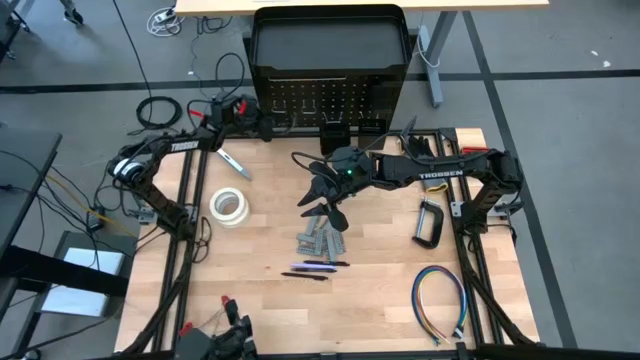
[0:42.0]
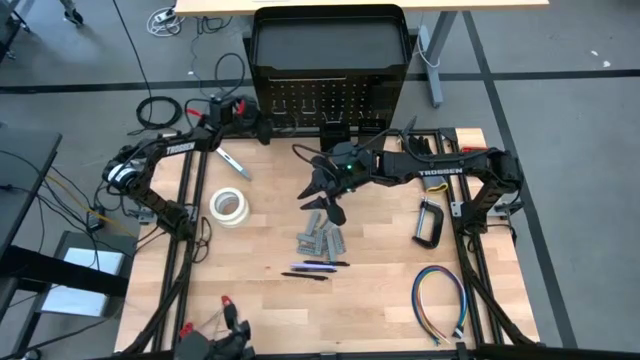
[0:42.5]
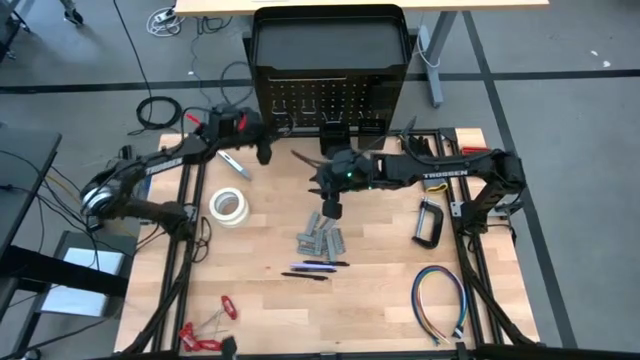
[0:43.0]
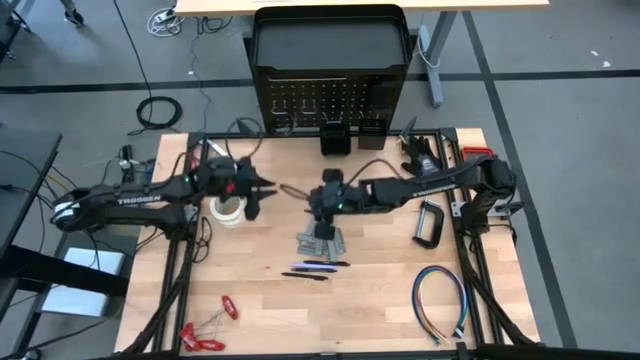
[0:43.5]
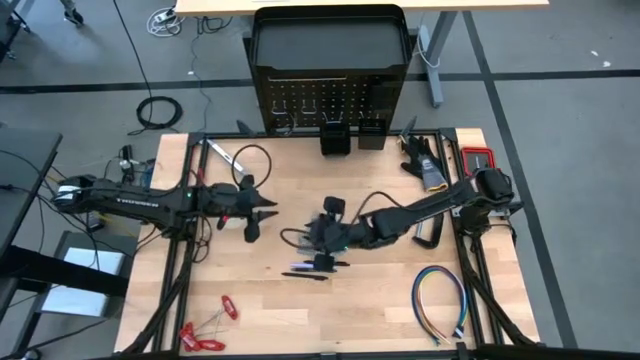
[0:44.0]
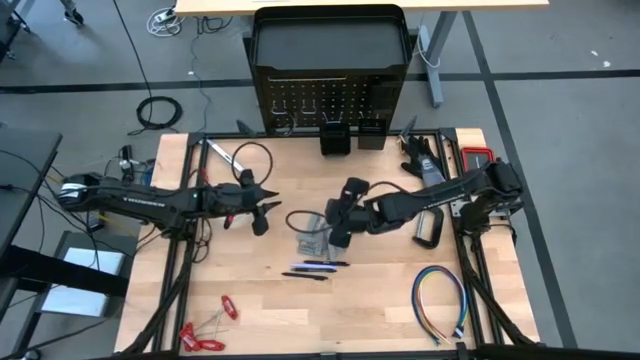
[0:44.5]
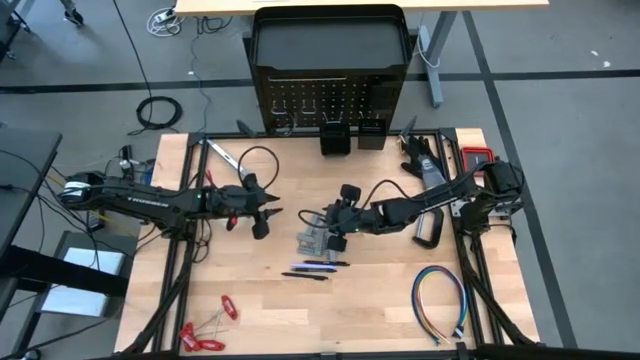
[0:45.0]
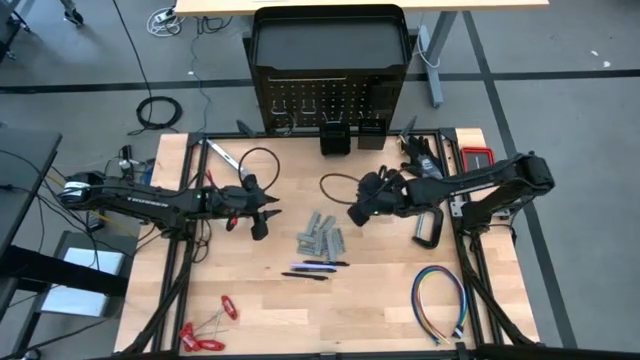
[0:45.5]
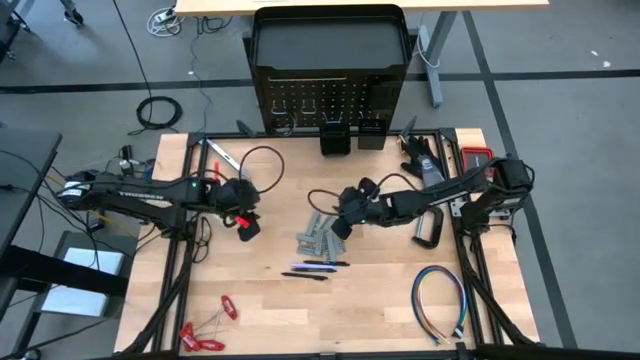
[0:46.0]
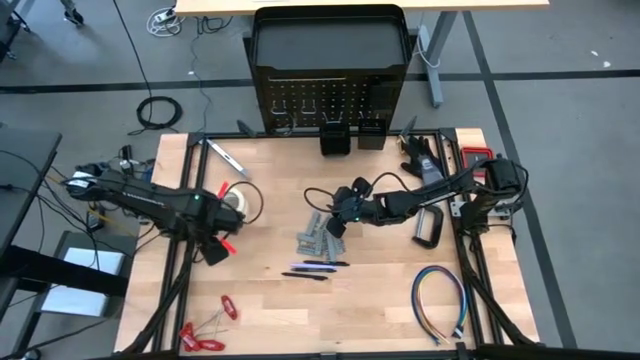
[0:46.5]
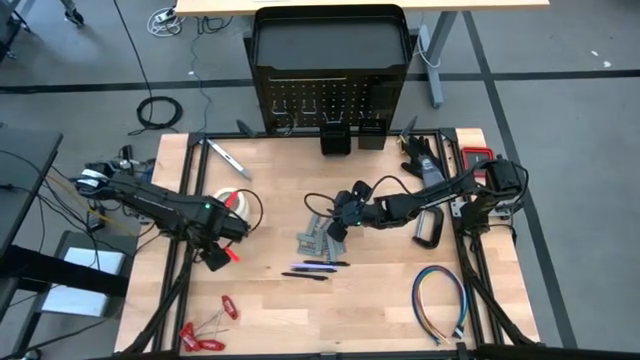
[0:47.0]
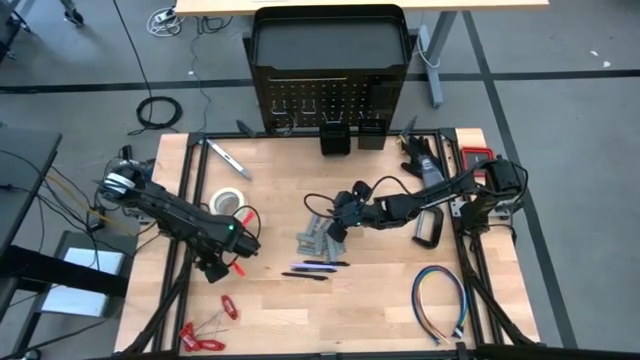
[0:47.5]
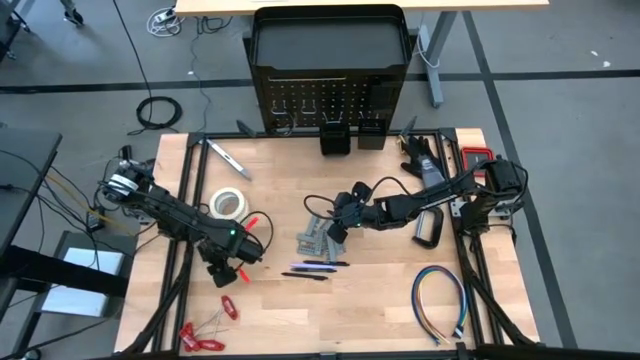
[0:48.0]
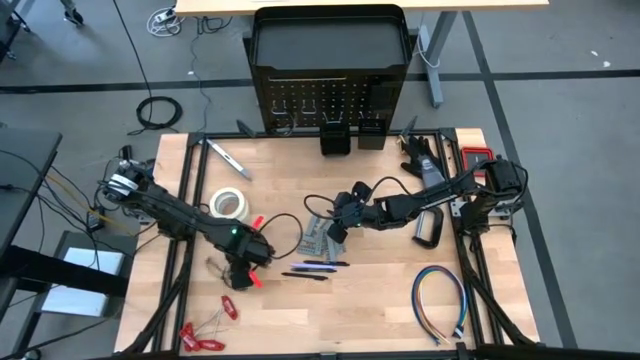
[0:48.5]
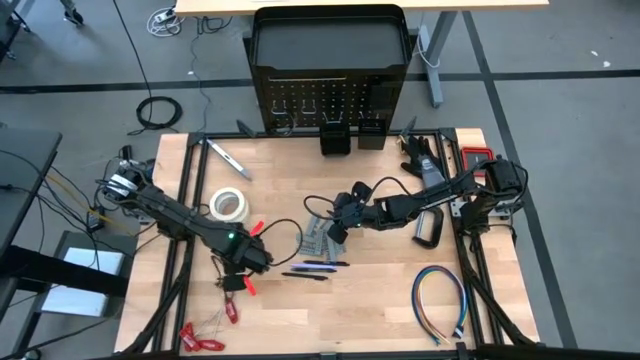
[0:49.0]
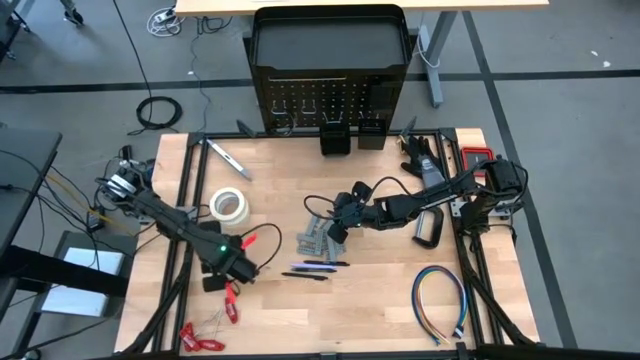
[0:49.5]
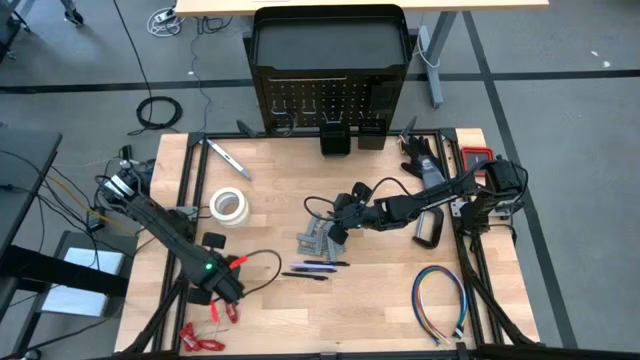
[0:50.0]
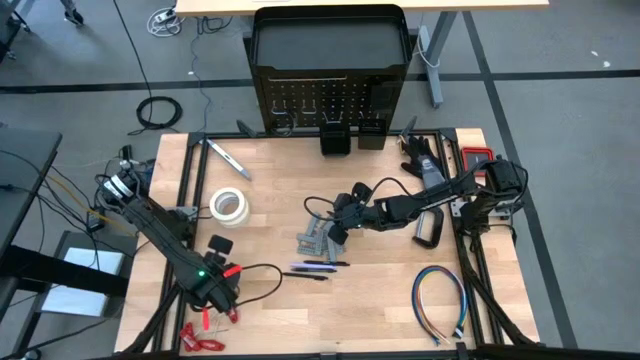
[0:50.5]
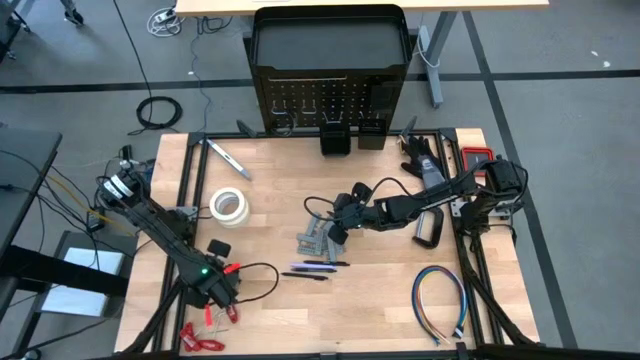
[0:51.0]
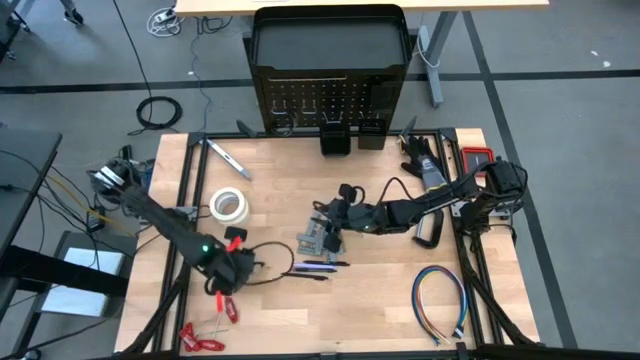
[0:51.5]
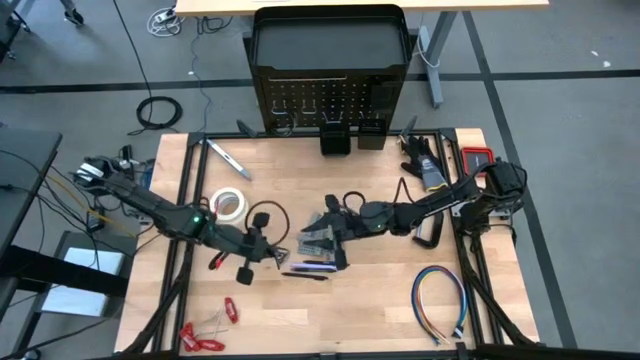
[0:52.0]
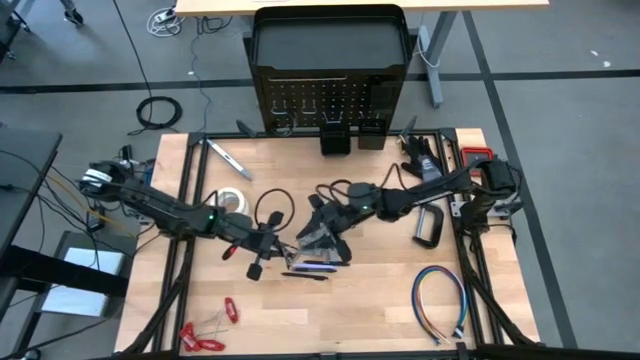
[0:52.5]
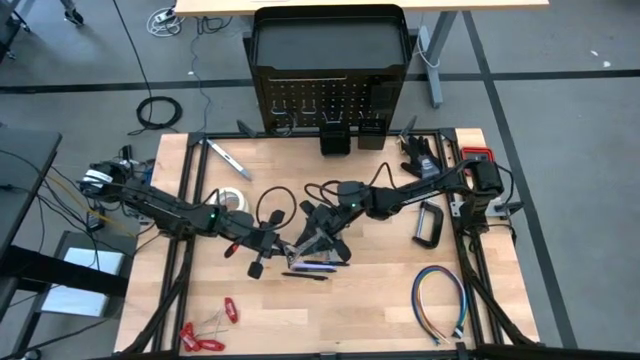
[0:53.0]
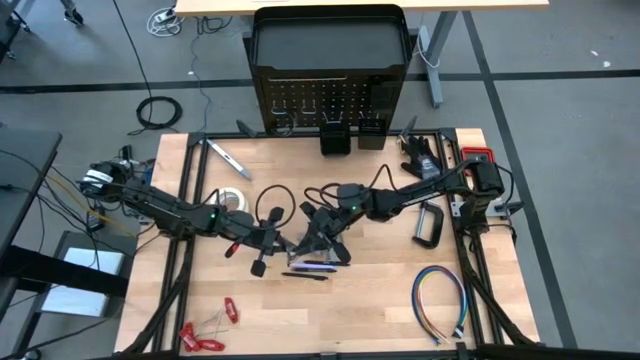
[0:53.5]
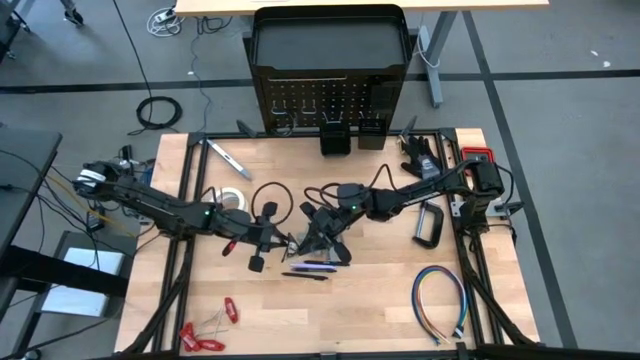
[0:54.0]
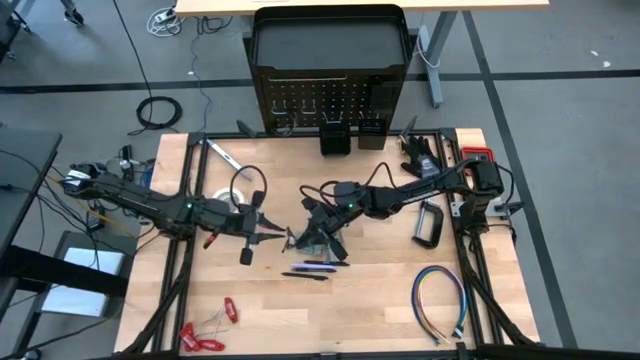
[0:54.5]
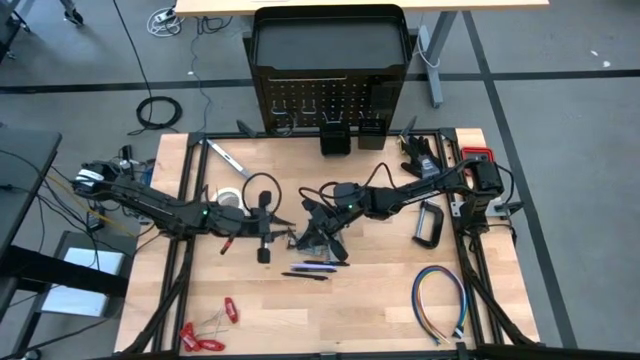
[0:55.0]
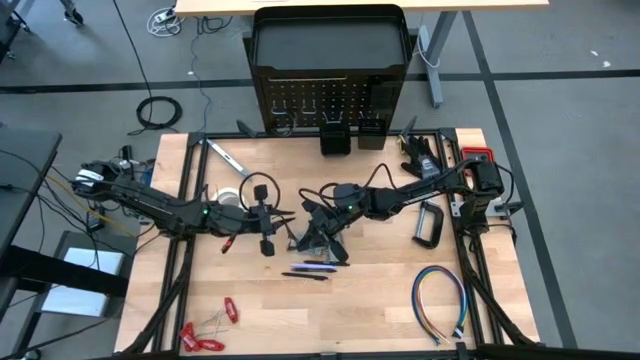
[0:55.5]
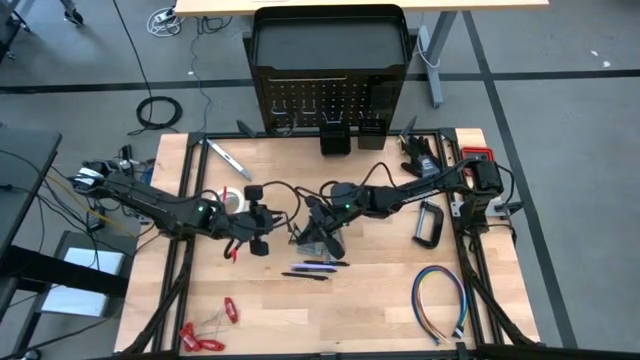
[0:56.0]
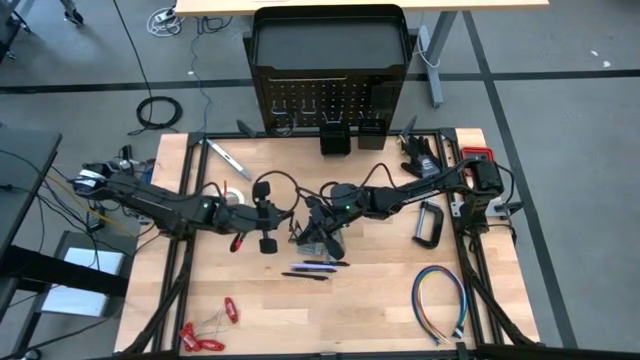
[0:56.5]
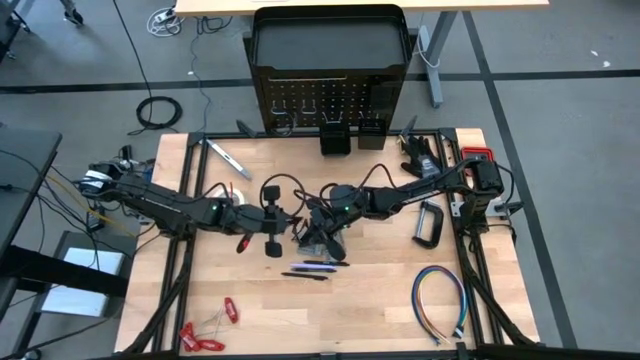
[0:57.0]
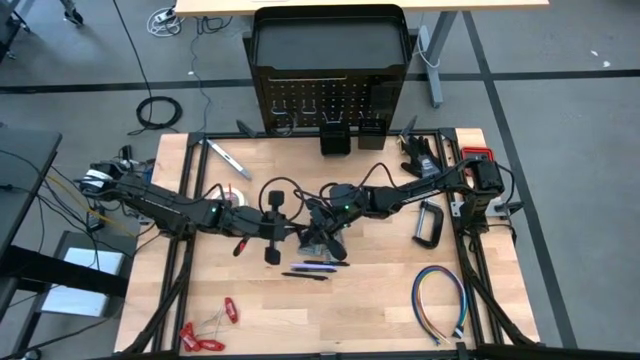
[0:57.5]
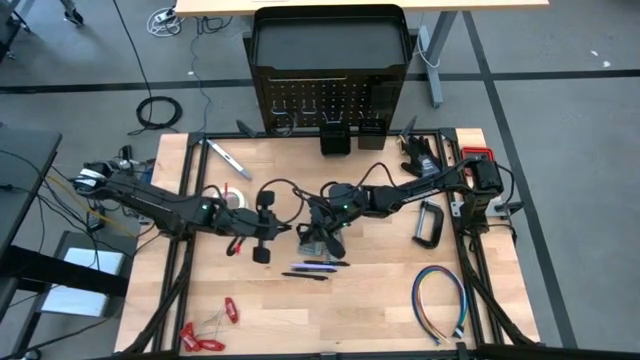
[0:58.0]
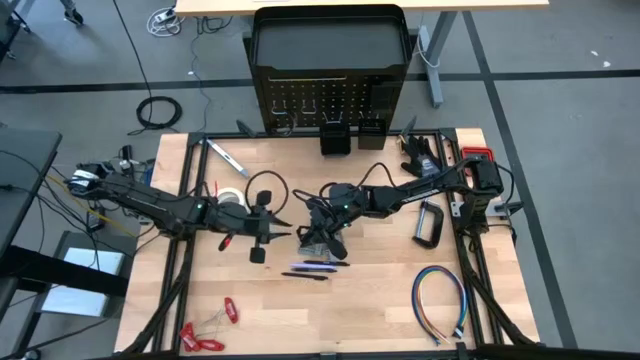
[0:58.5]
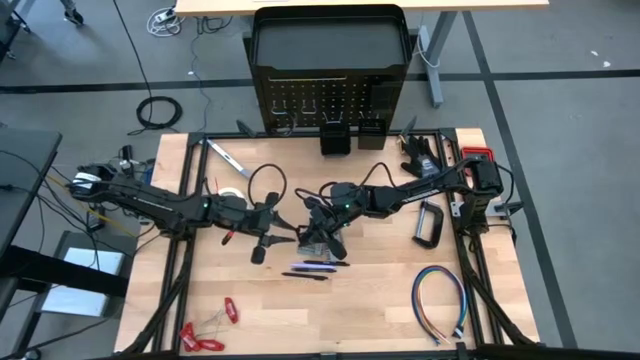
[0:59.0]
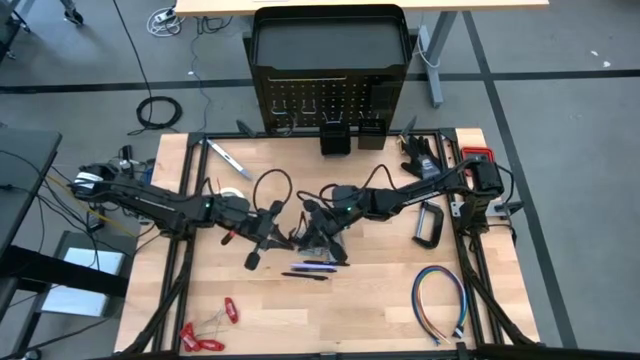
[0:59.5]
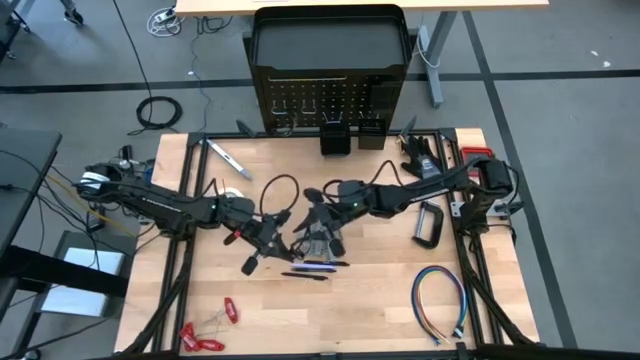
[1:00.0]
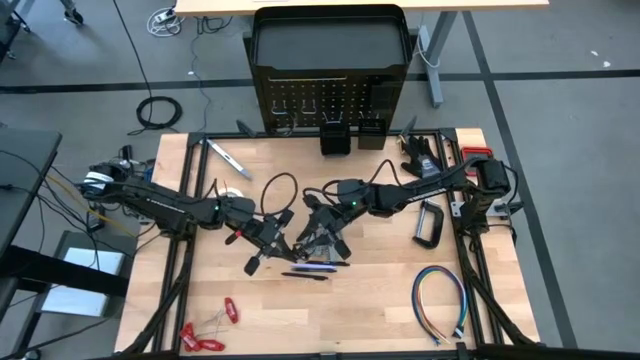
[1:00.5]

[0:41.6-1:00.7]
Task: Hang tools onto peg board
Hang the black safety glasses on the peg board

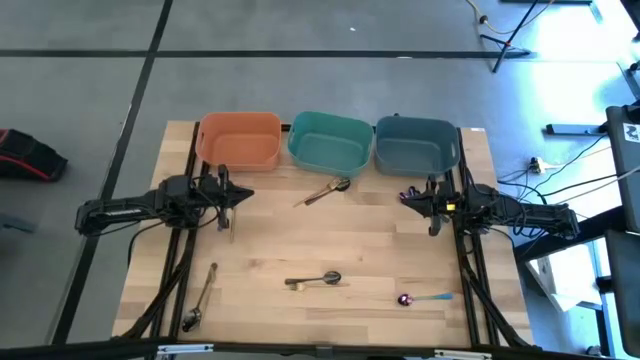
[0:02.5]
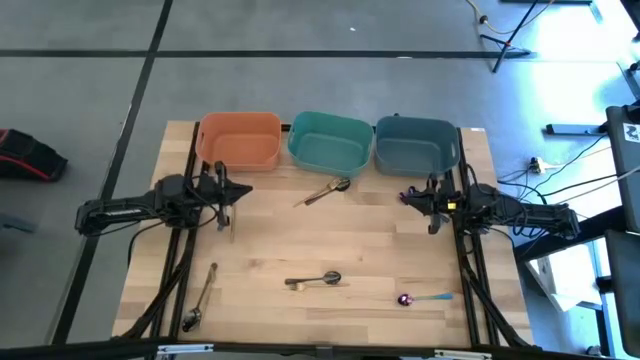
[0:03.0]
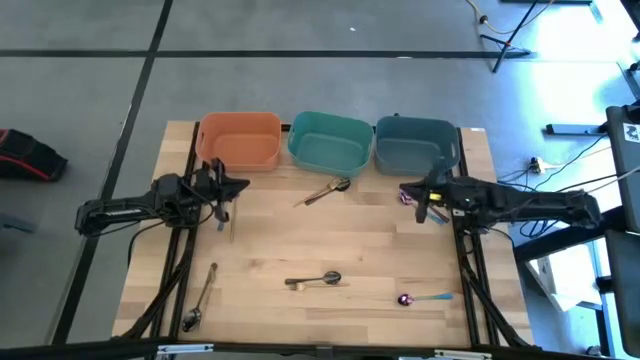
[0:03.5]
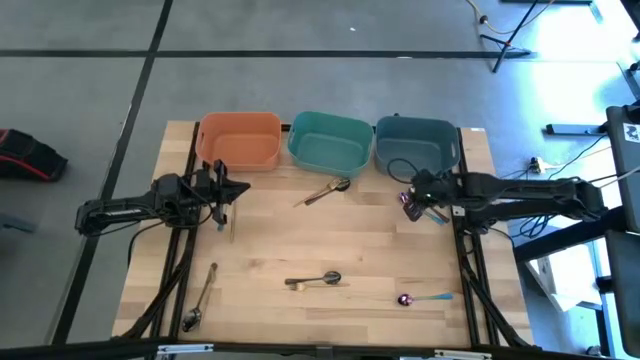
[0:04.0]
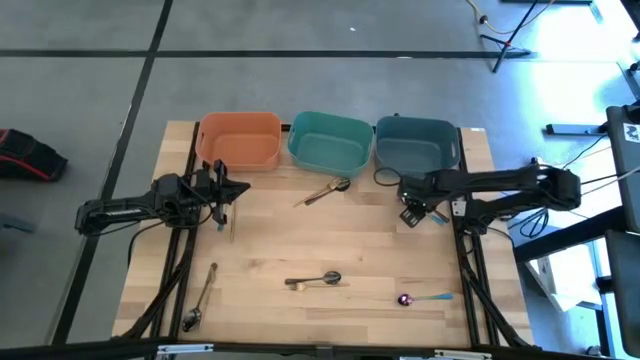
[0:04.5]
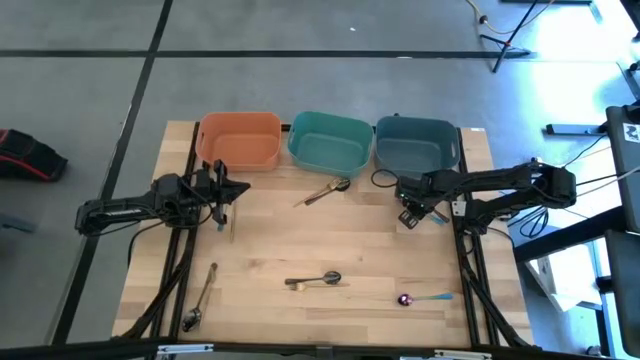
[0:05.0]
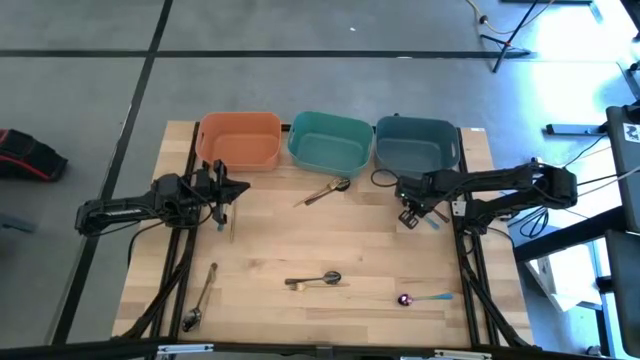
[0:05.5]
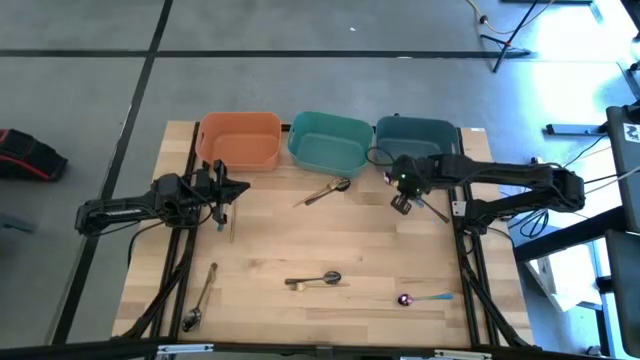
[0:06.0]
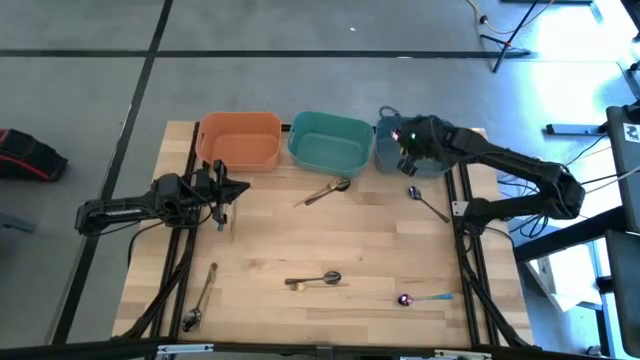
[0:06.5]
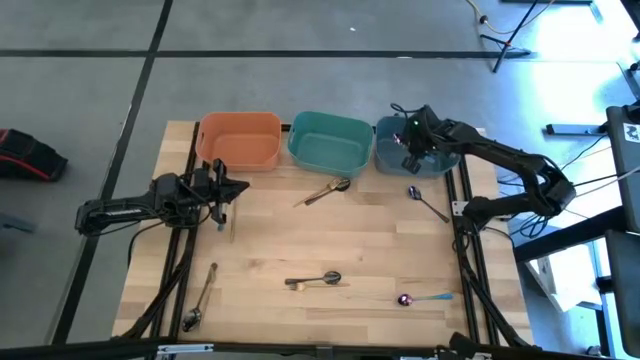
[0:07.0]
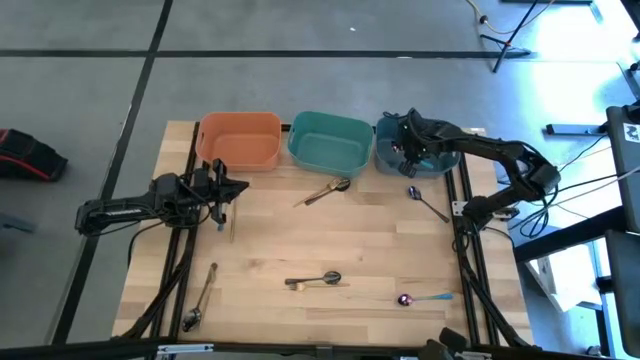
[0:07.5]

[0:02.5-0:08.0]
Task: Sort silverware by color (type)
Put the blue spoon into the blue bin
